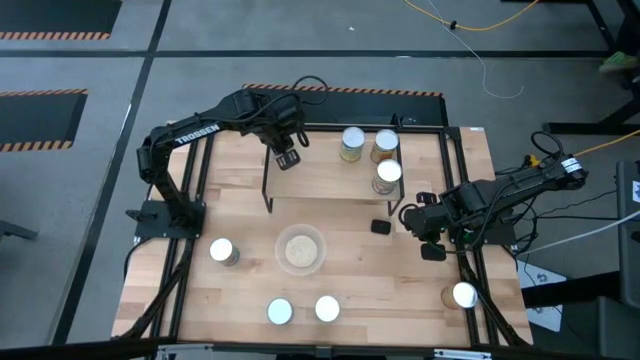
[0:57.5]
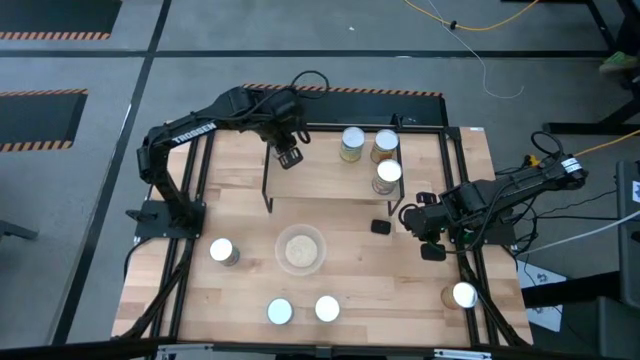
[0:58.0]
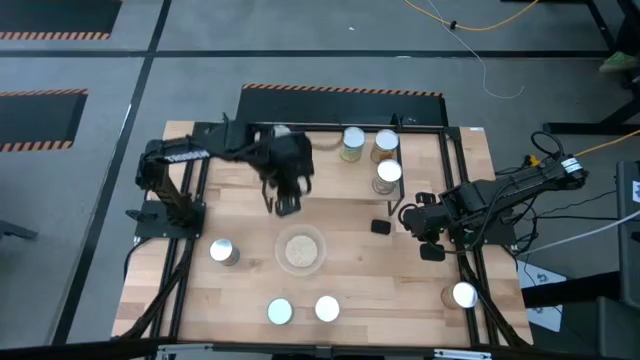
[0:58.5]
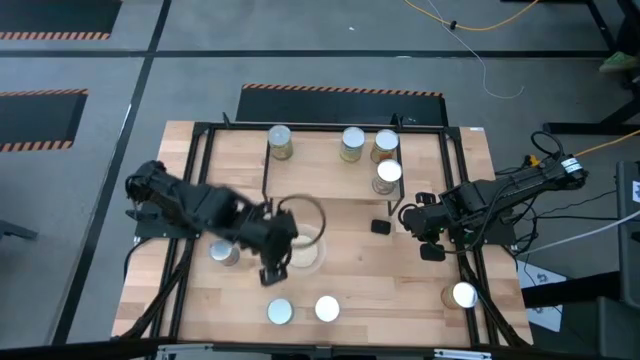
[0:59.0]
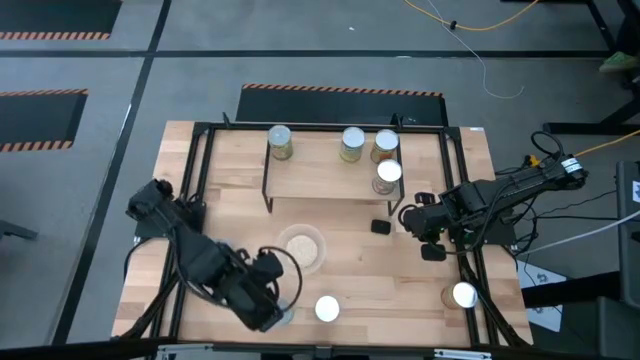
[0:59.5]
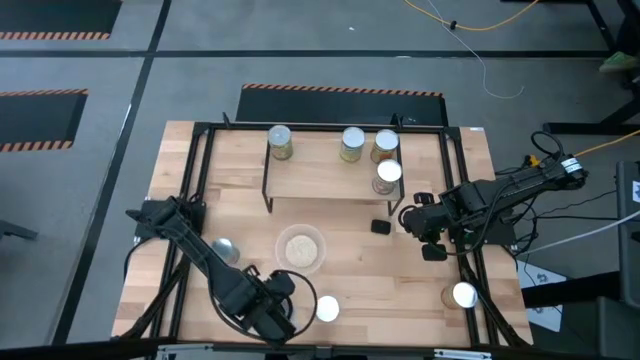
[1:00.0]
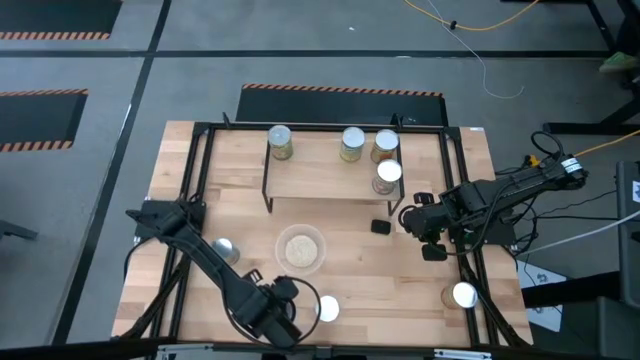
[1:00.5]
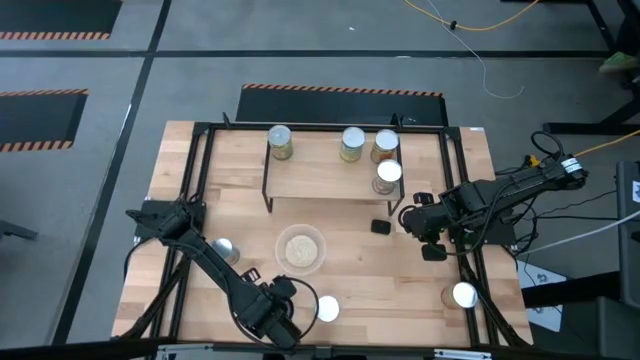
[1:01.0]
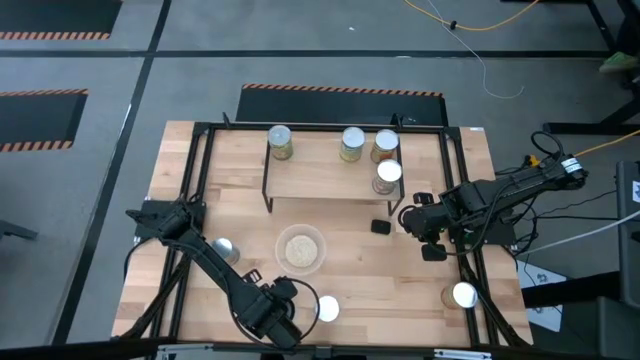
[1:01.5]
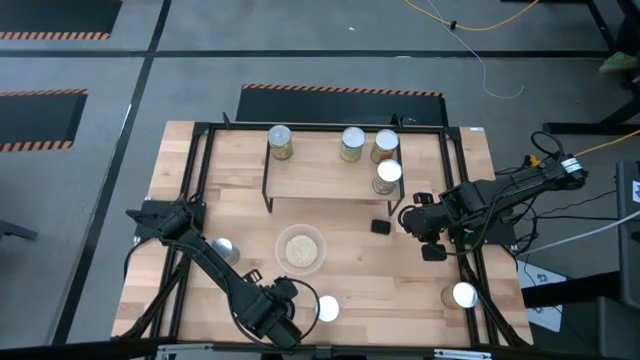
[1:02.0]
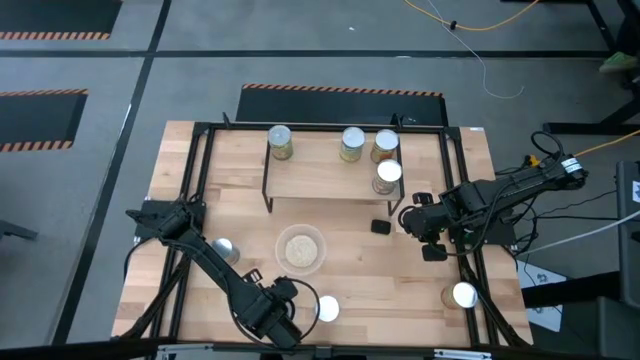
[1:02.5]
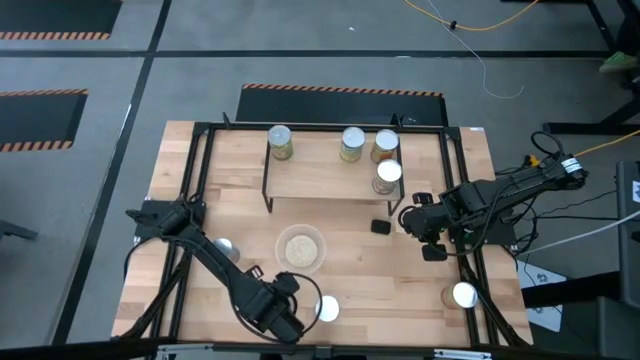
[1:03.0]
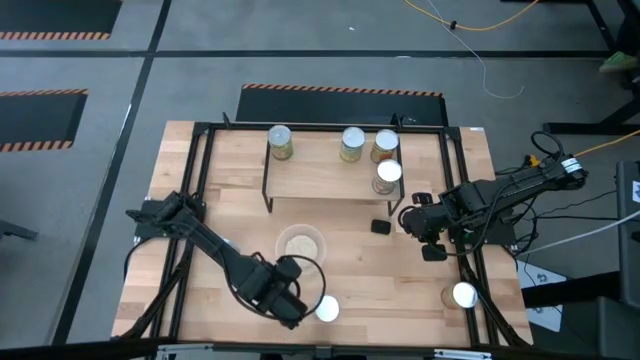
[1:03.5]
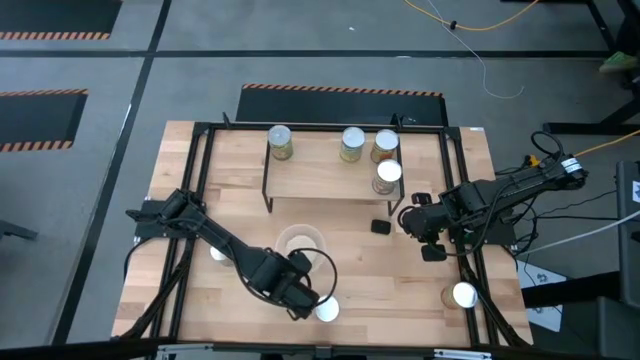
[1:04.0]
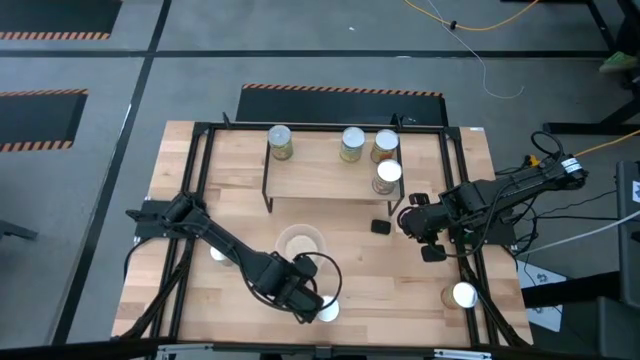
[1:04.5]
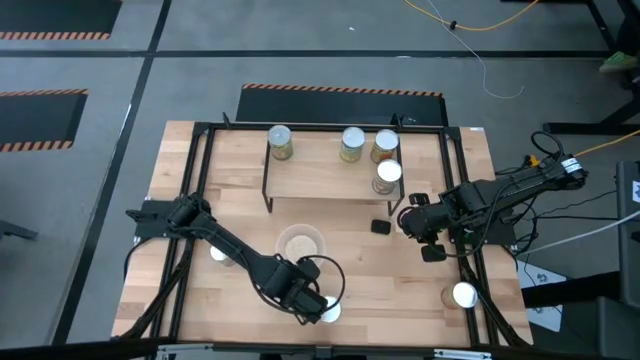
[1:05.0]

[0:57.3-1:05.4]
Task: Pick and place cans onto a shelf
Put the canned bottom cherries on the shelf

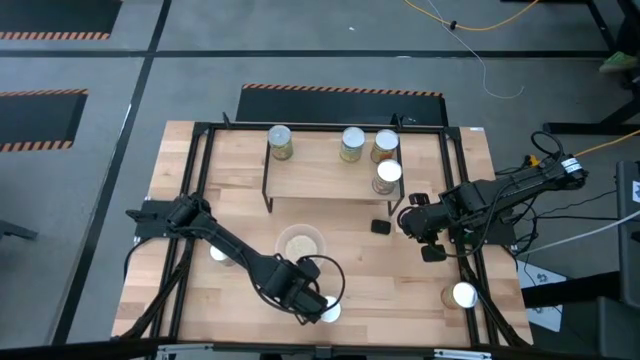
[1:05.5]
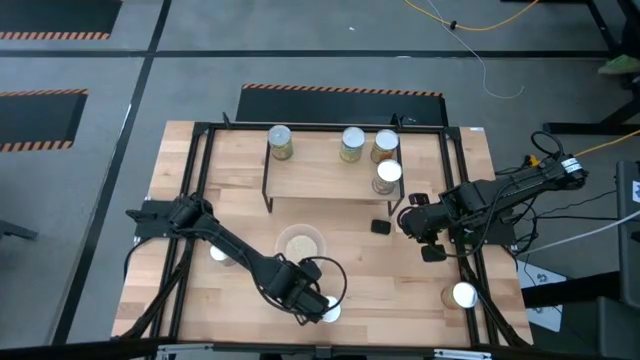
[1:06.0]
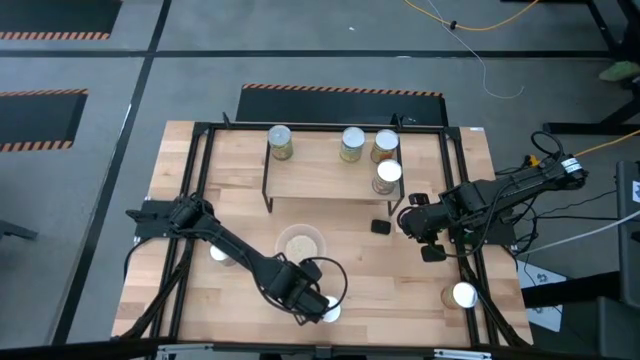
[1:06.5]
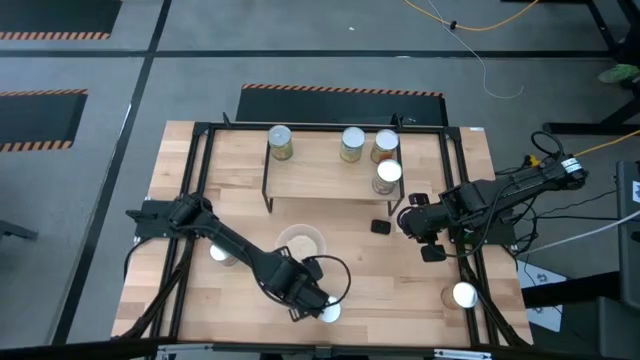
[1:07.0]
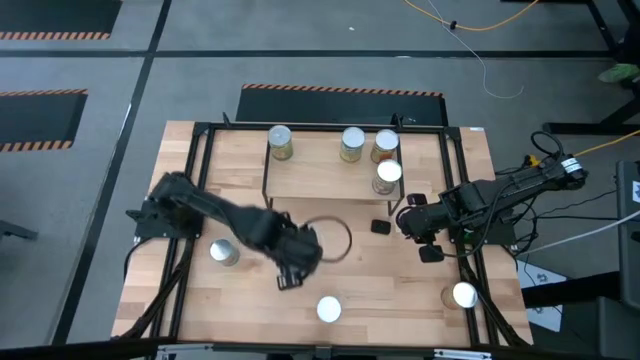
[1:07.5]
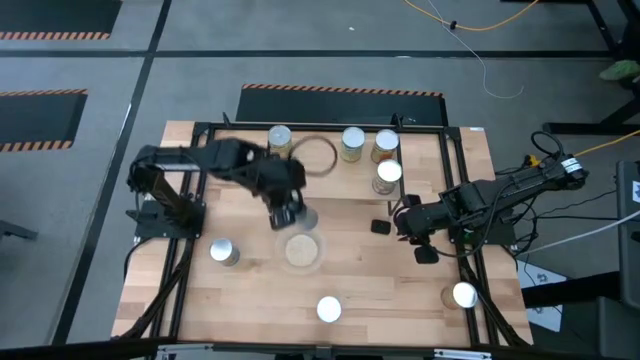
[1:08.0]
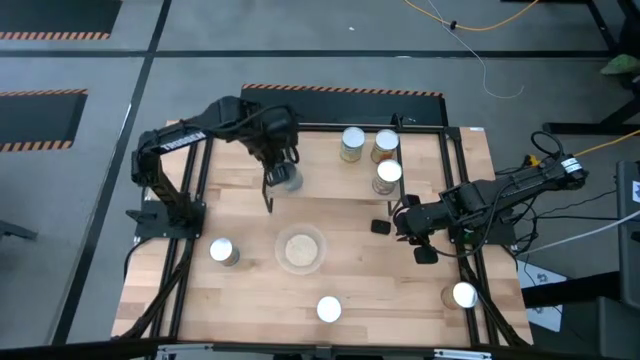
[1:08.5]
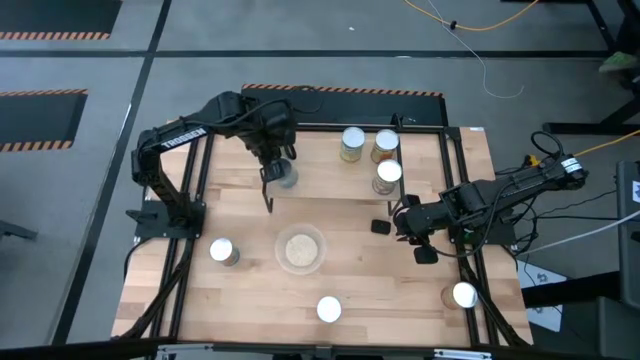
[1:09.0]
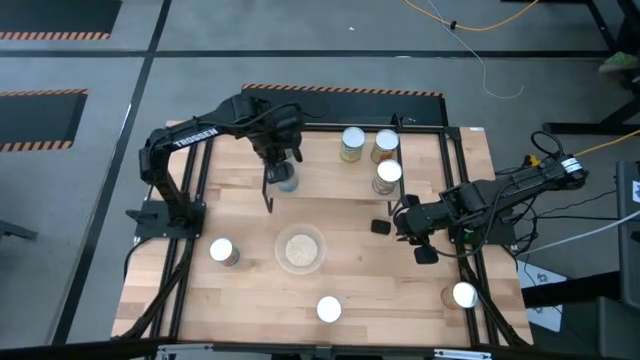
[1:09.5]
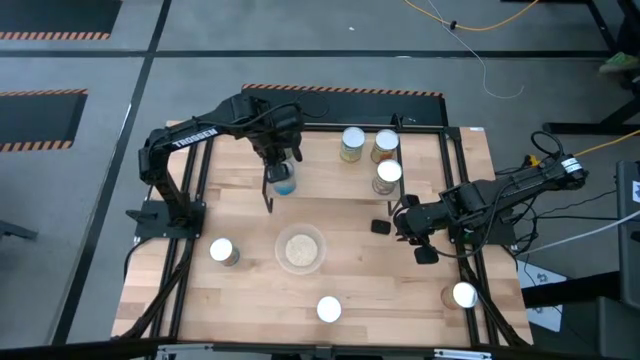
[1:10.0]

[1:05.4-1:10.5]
Put the canned bottom cherries on the shelf

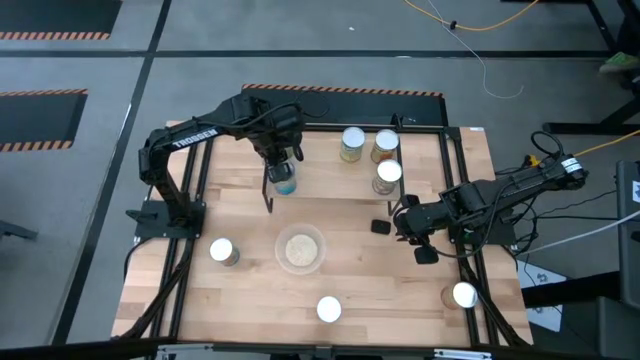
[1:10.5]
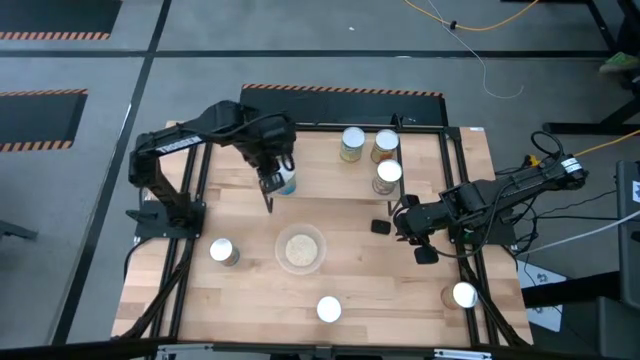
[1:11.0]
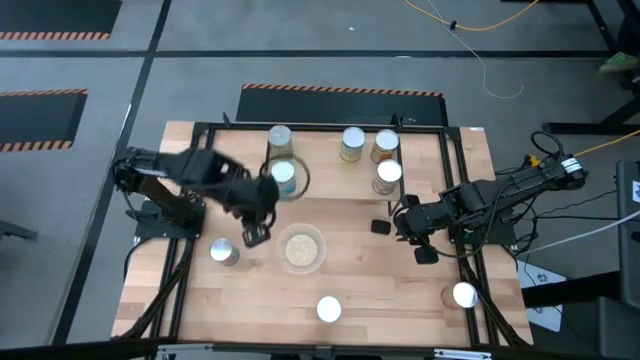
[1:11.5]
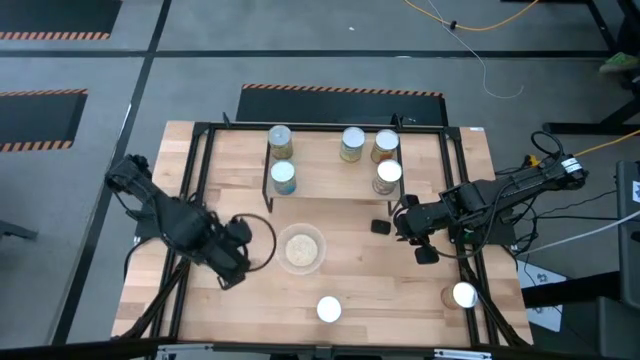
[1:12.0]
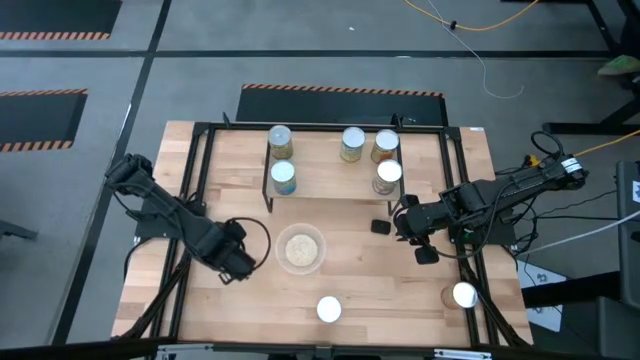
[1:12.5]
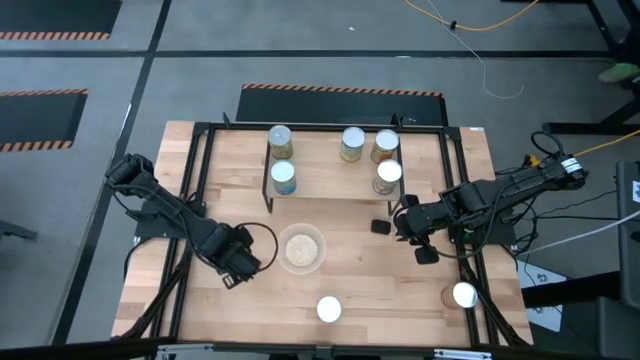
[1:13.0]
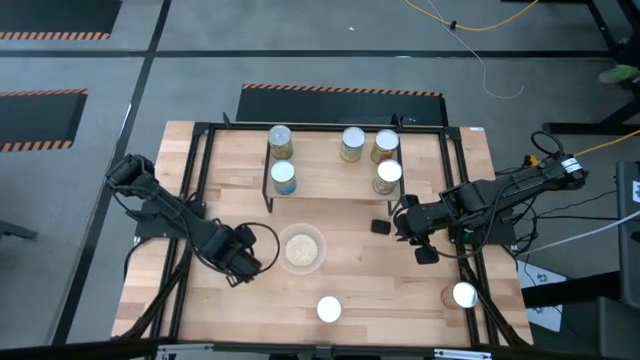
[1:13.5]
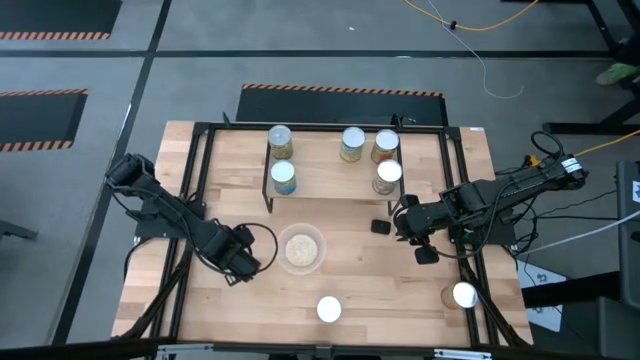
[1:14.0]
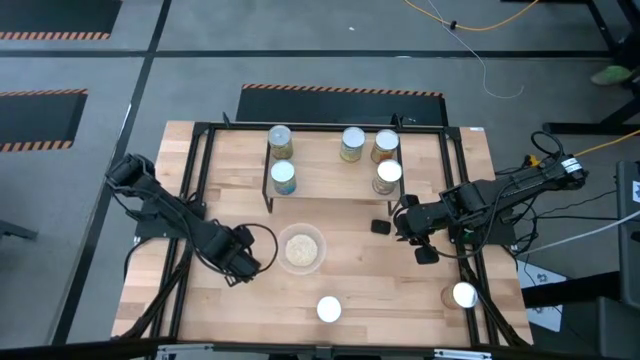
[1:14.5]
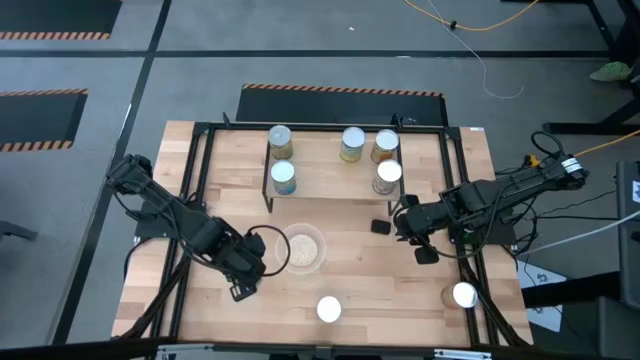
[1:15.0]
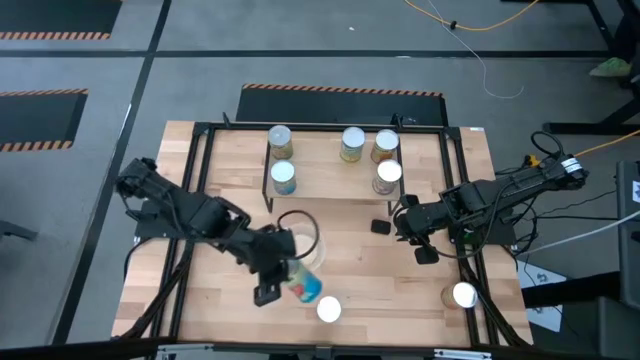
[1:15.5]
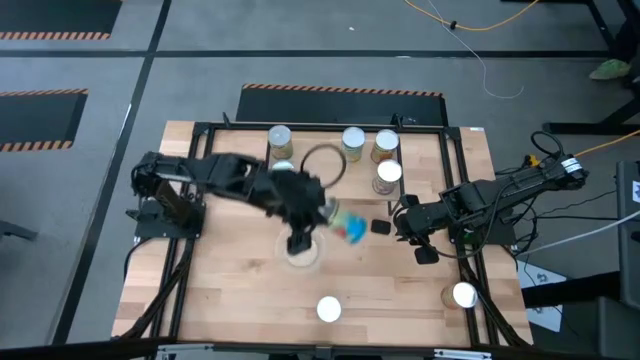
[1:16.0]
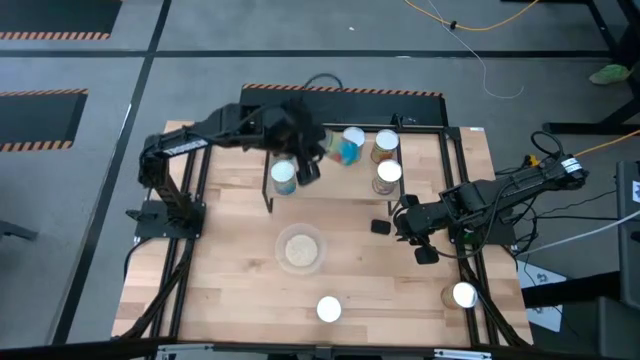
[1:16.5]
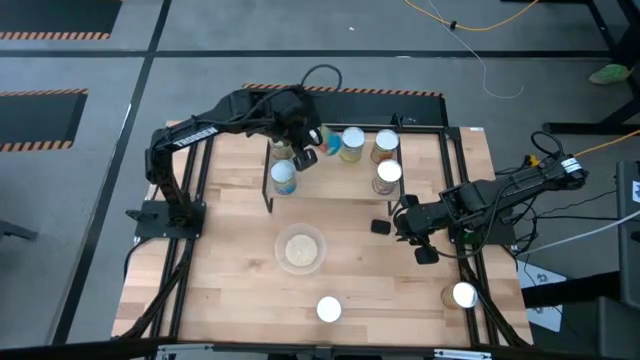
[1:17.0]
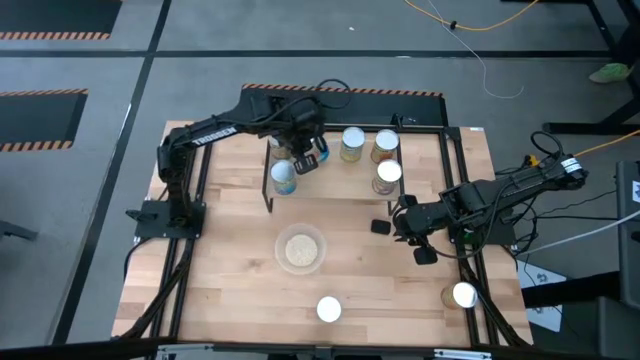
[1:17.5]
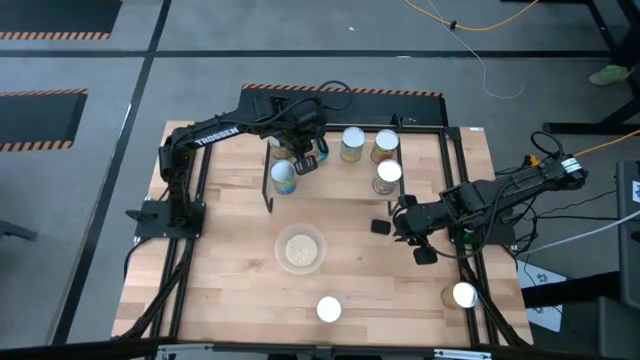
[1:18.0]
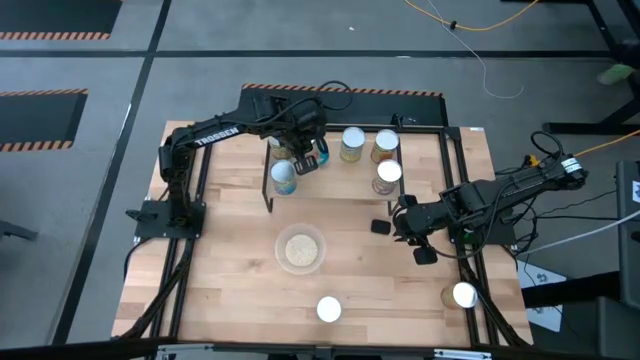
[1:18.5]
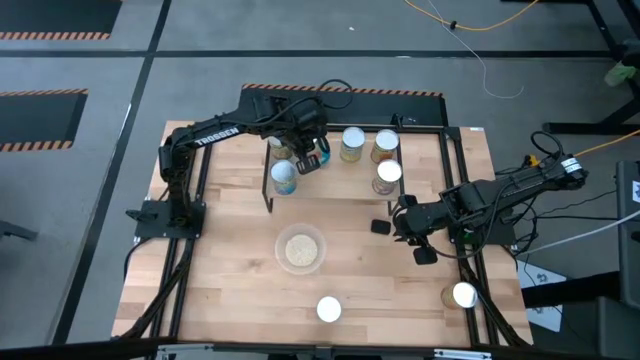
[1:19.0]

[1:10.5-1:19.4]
Put the canned cherries on the shelf
